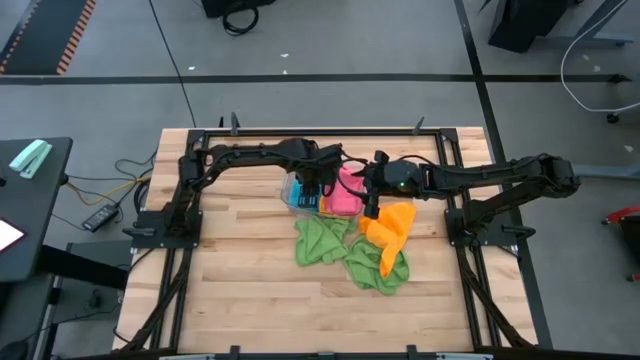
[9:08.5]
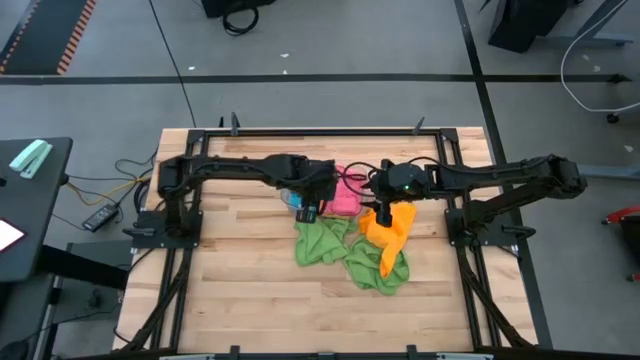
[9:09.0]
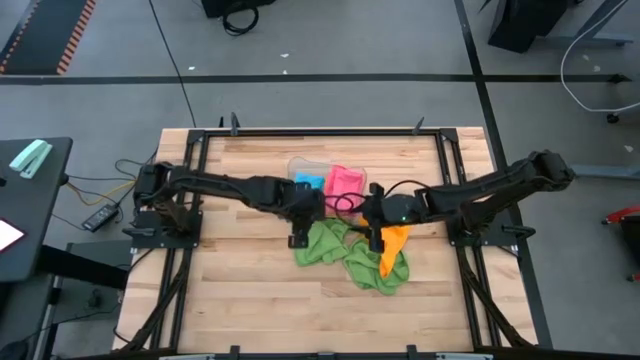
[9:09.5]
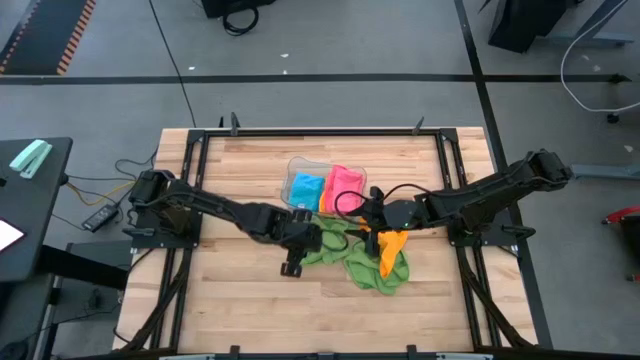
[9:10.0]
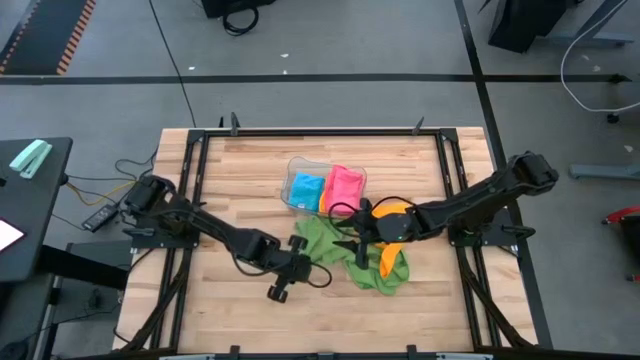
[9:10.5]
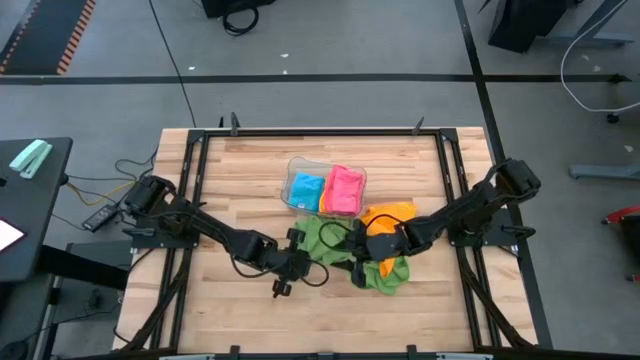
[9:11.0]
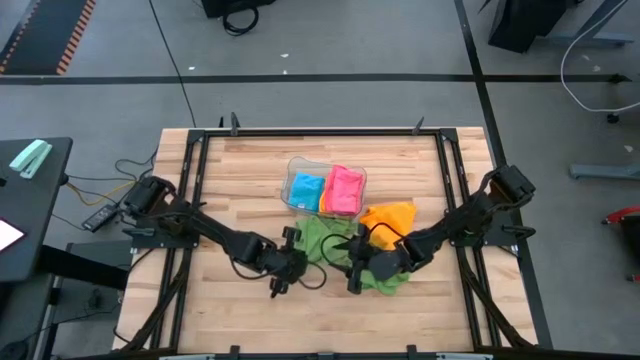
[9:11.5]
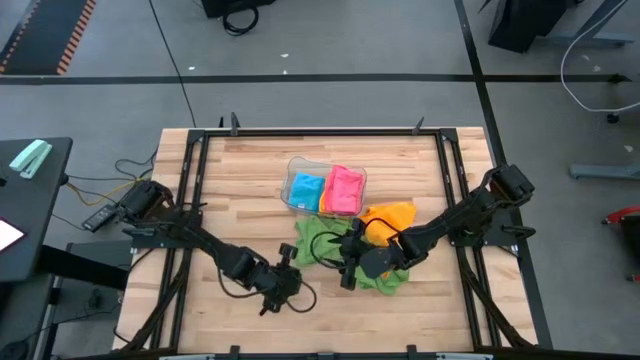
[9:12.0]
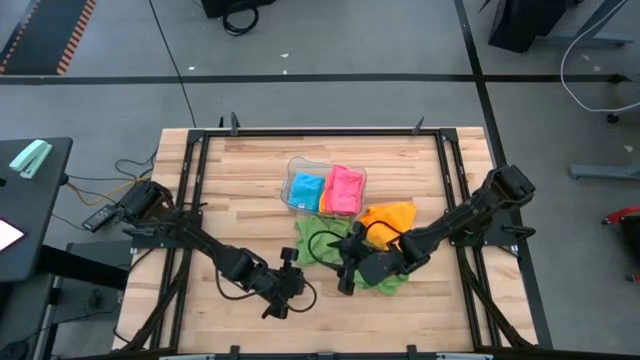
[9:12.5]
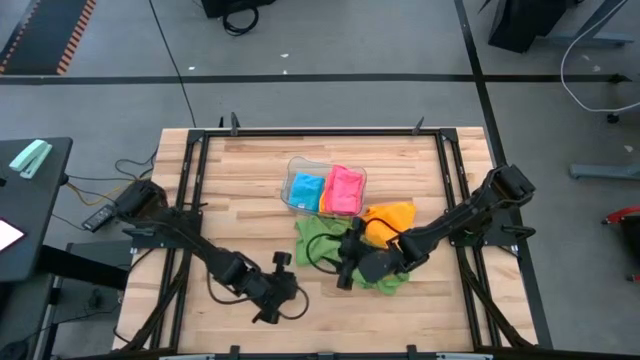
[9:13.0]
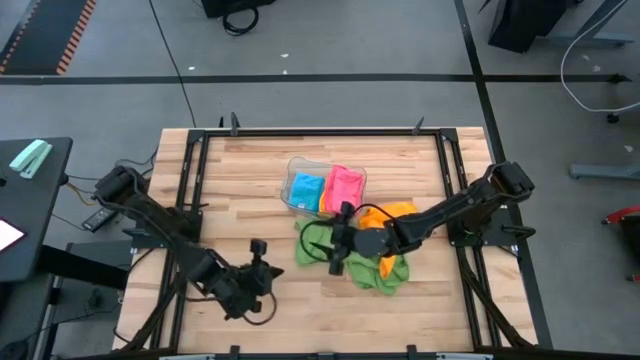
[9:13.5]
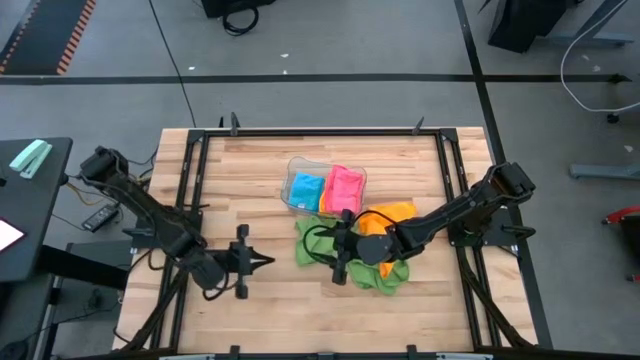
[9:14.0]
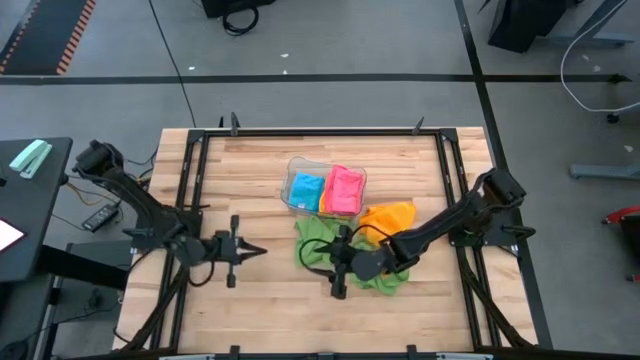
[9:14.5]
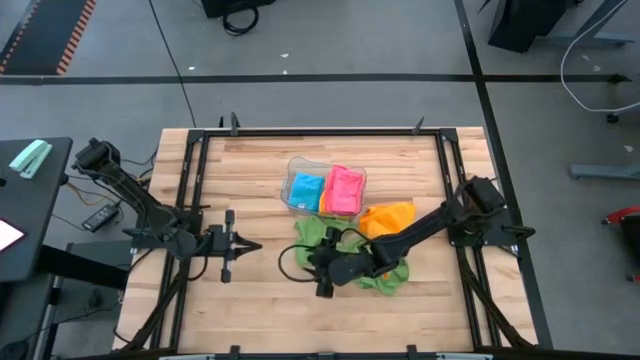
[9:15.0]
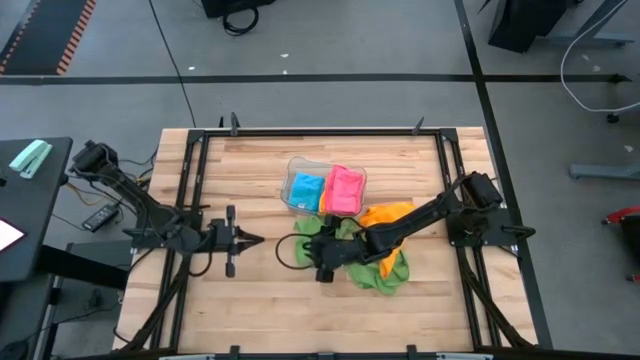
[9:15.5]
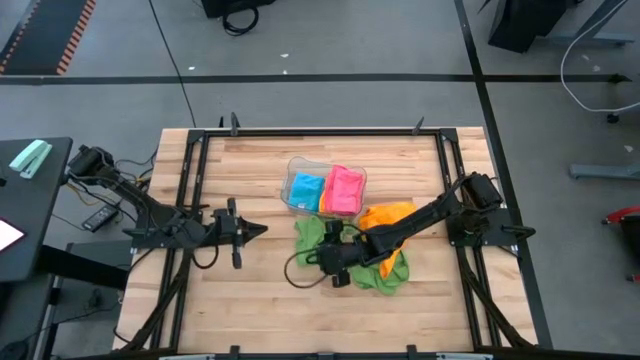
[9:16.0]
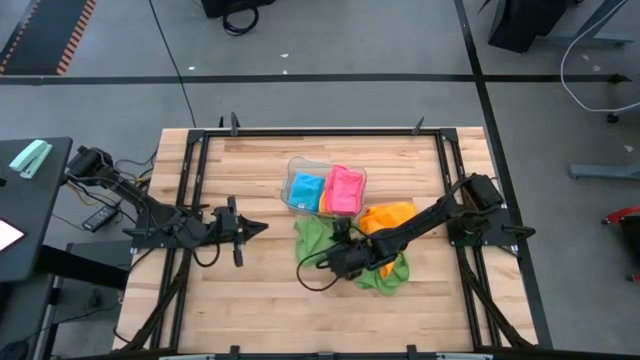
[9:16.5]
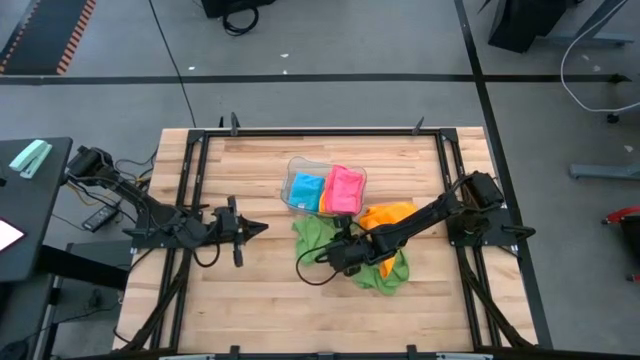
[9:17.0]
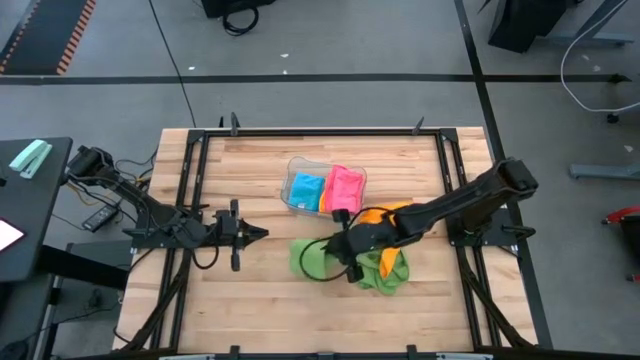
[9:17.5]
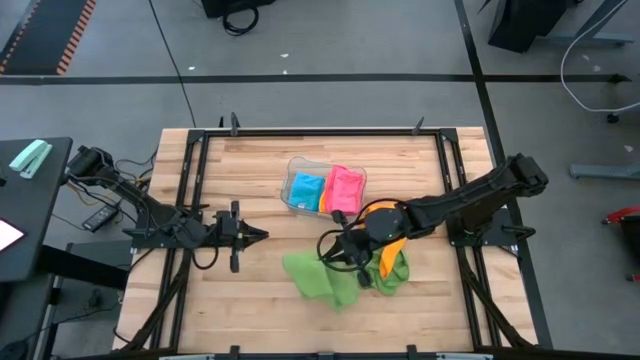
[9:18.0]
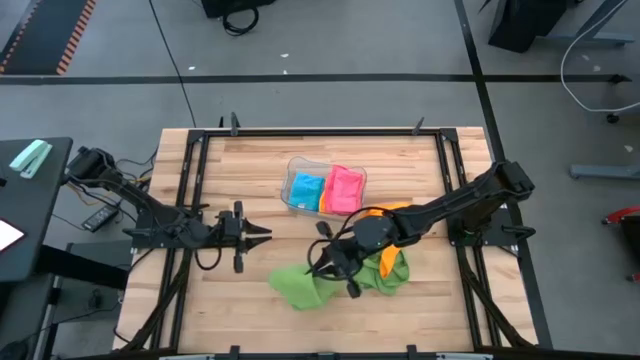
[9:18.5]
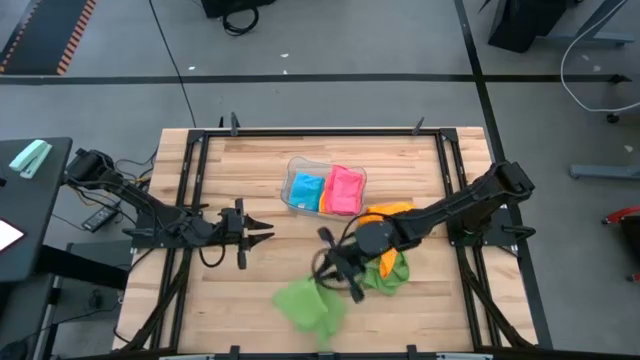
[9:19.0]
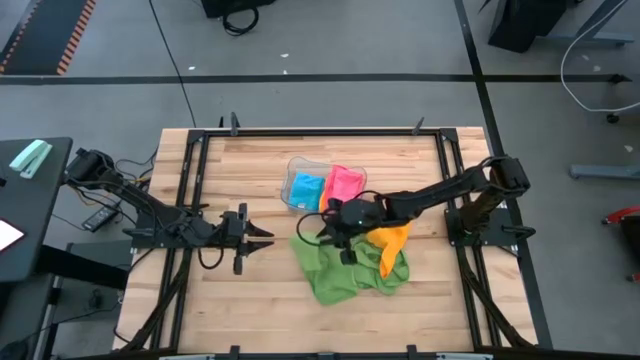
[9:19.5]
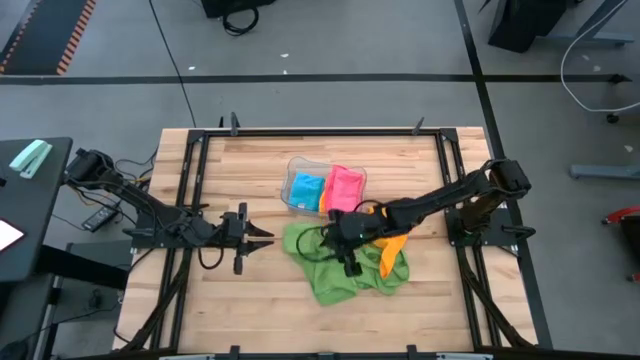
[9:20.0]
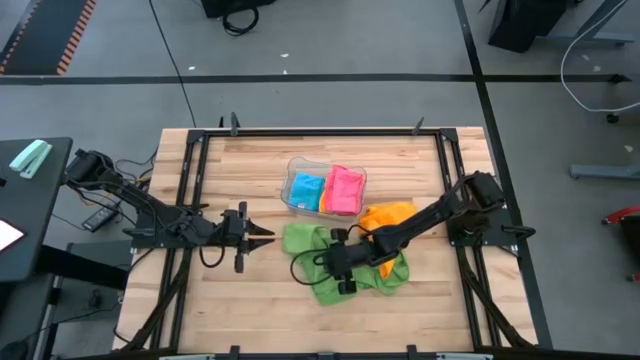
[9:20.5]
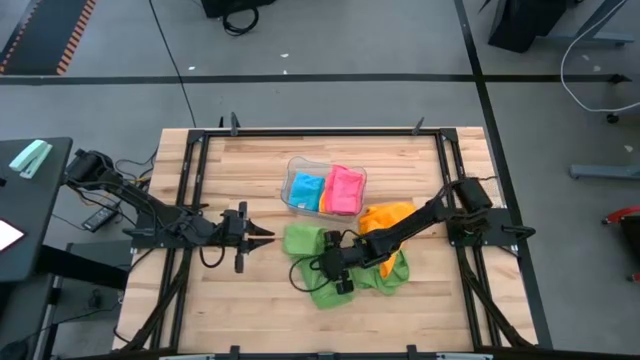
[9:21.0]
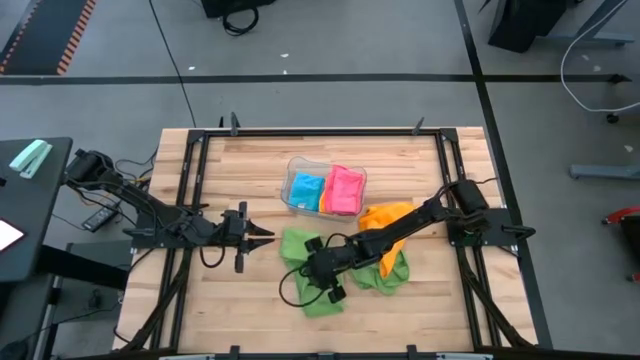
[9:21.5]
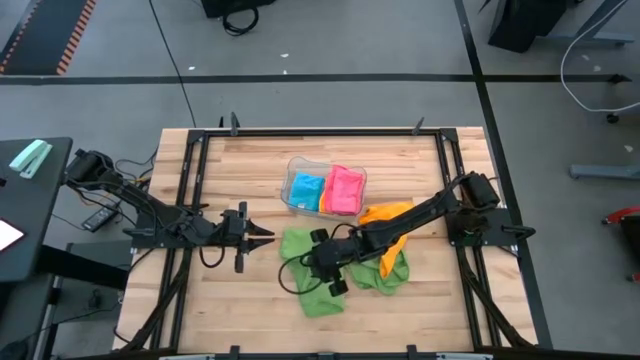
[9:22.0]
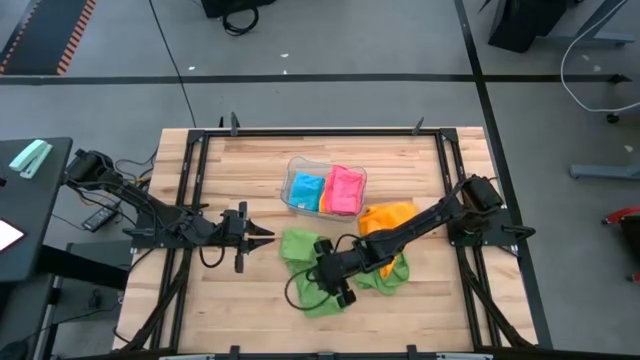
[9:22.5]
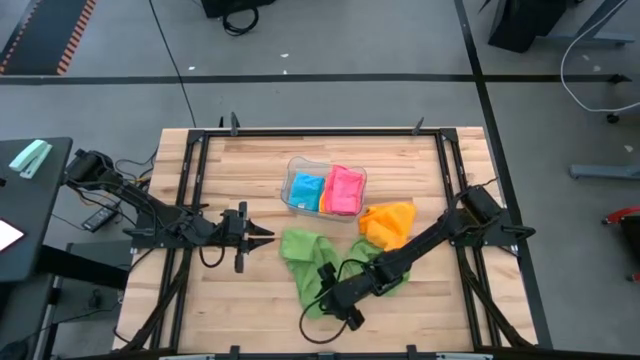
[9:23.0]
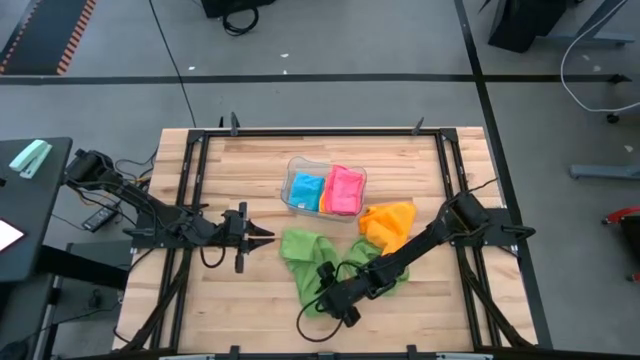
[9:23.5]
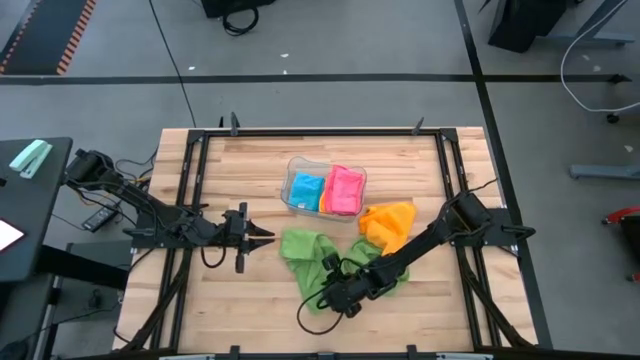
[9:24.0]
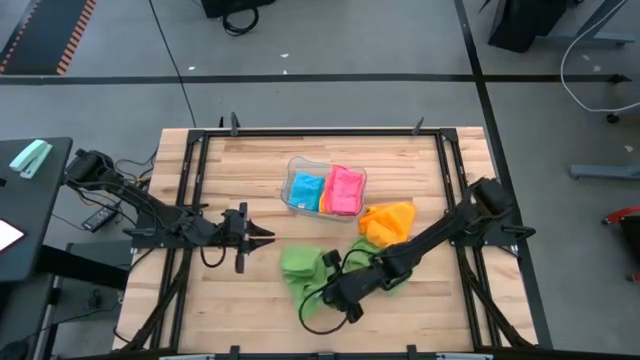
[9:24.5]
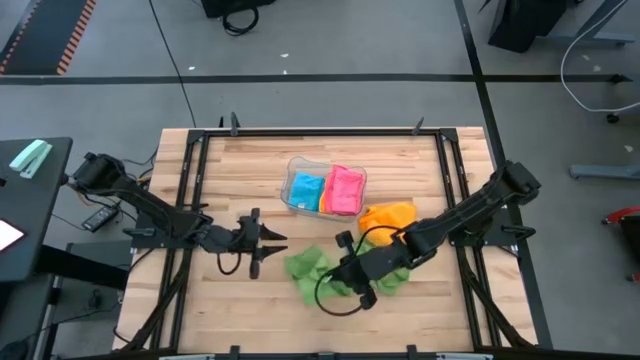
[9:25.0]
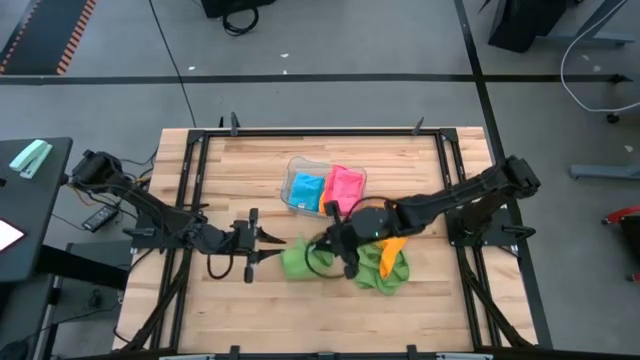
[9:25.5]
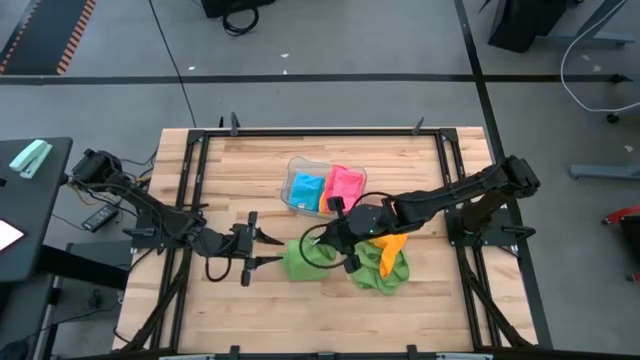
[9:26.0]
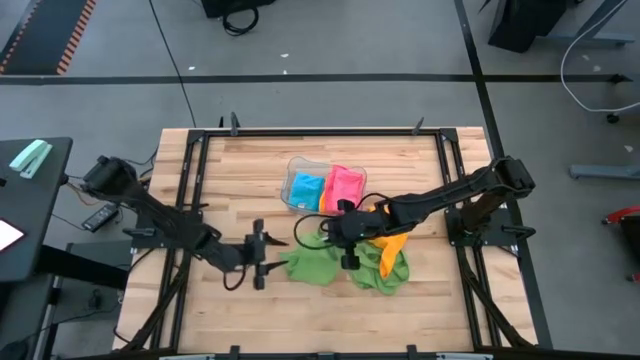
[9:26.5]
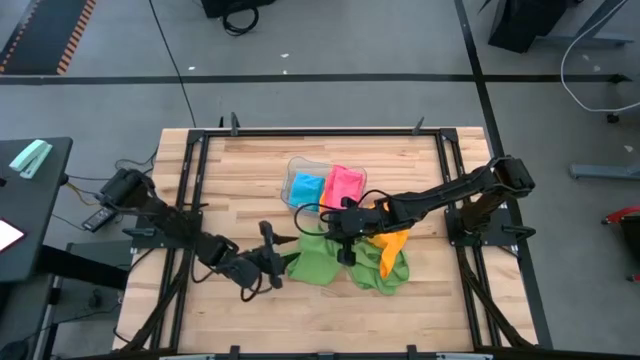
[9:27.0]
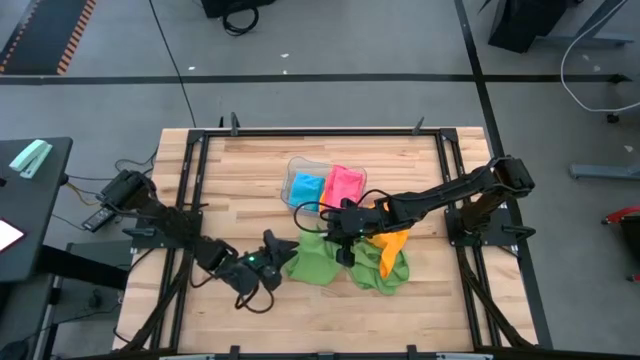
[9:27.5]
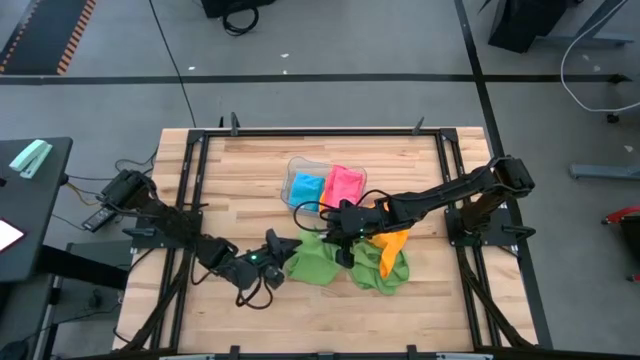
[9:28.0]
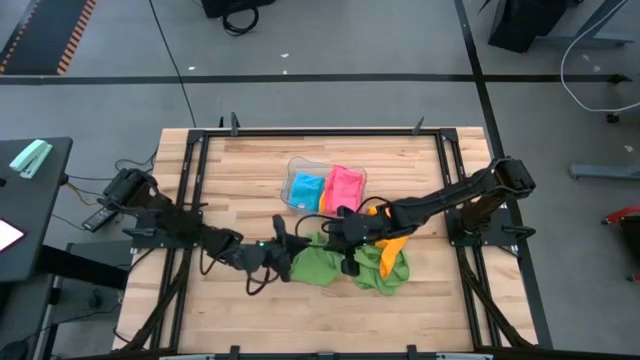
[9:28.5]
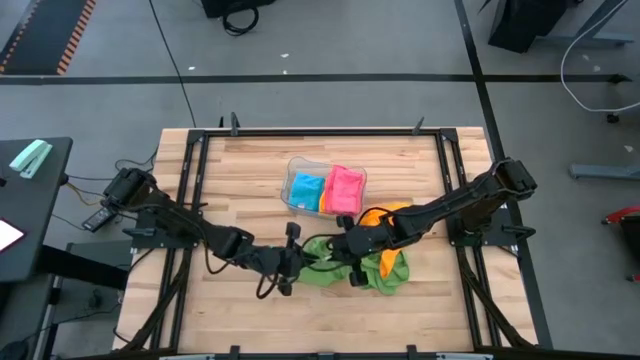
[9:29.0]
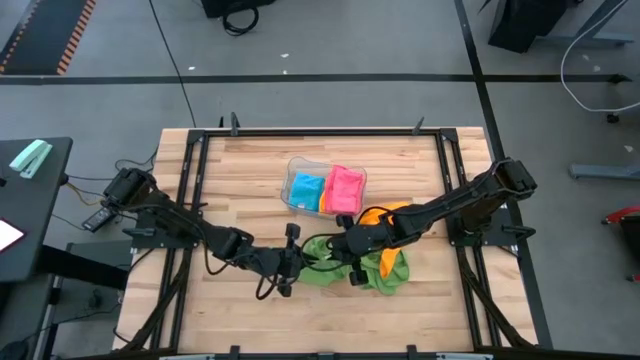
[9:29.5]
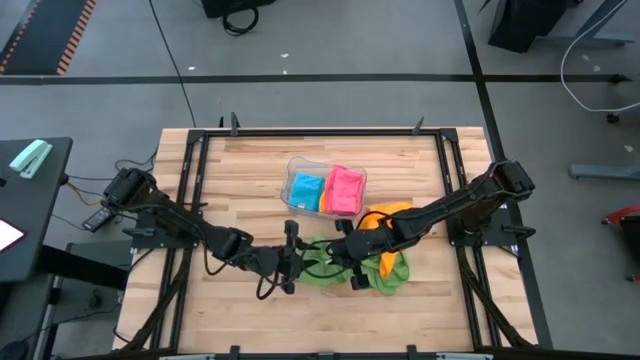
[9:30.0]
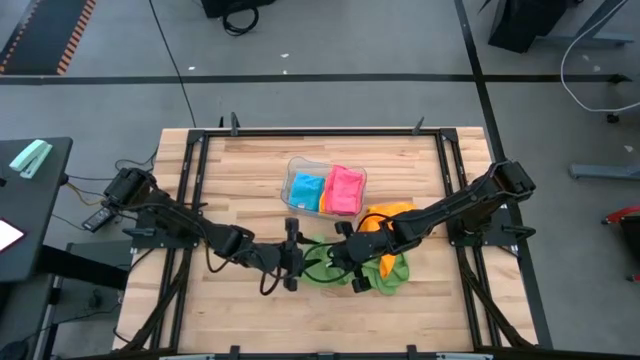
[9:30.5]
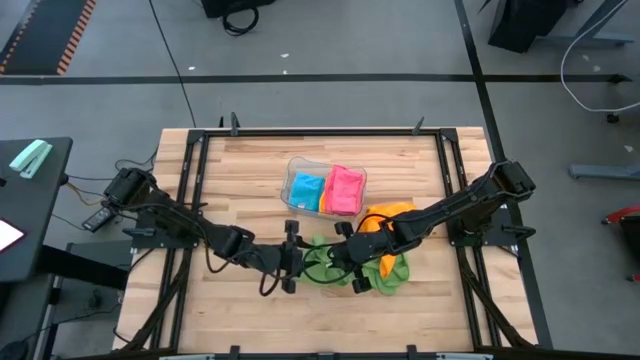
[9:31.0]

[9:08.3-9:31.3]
Task: Fold microfiber towels
Fold the top green microfiber cloth
